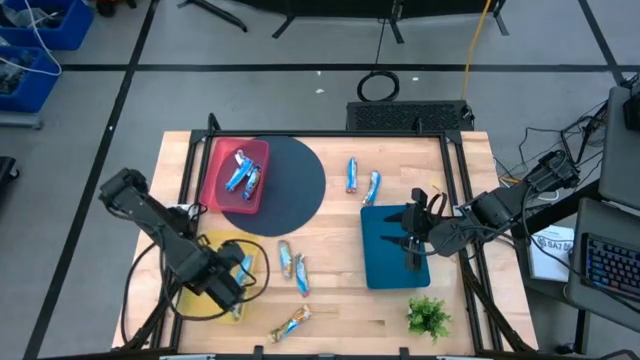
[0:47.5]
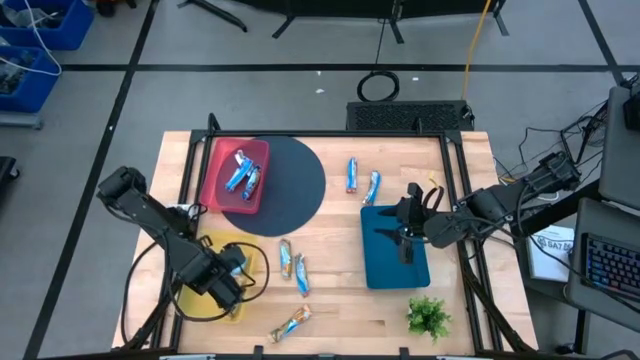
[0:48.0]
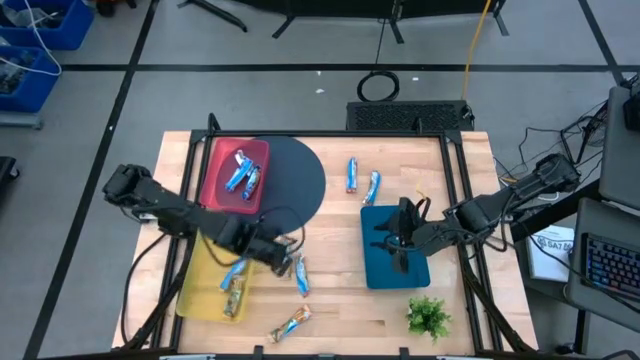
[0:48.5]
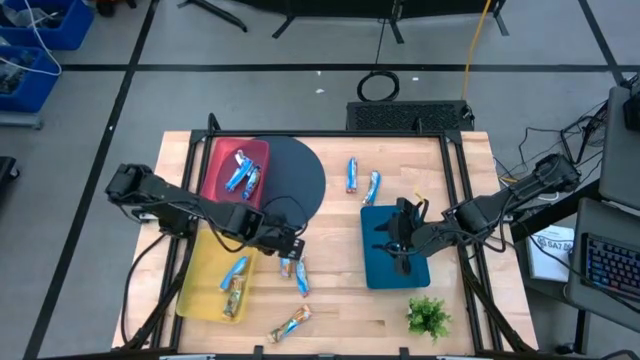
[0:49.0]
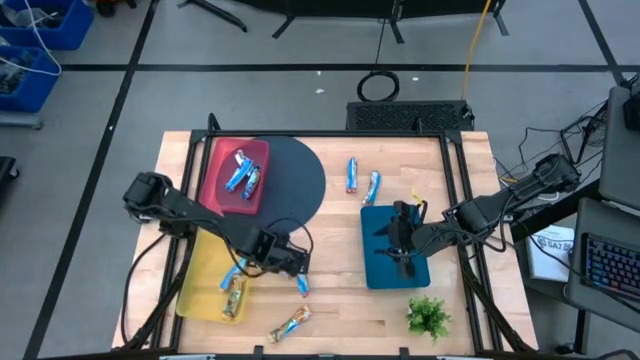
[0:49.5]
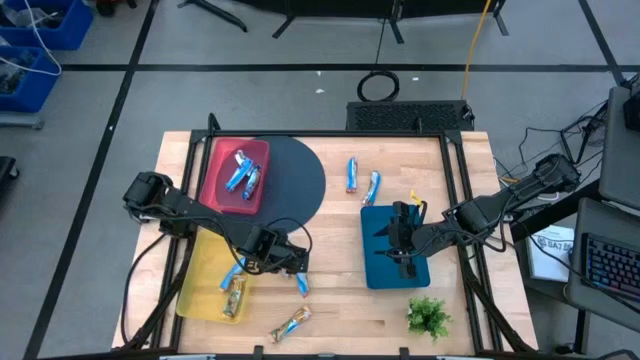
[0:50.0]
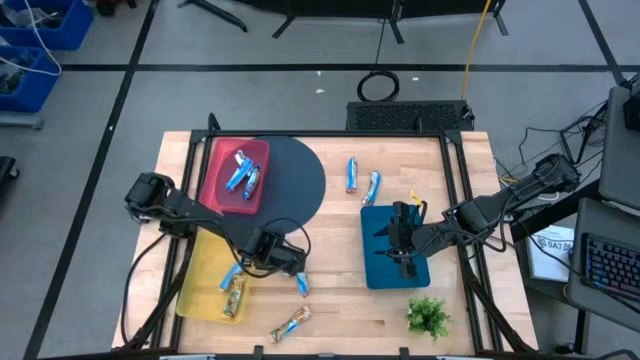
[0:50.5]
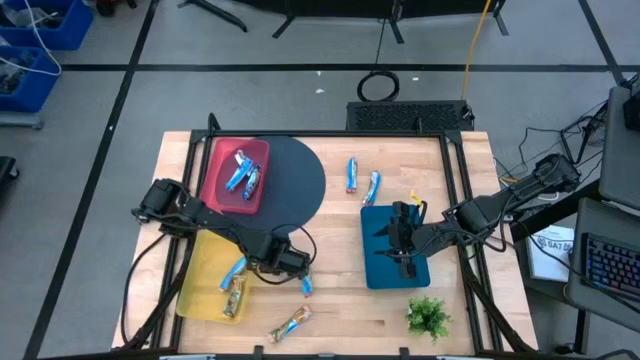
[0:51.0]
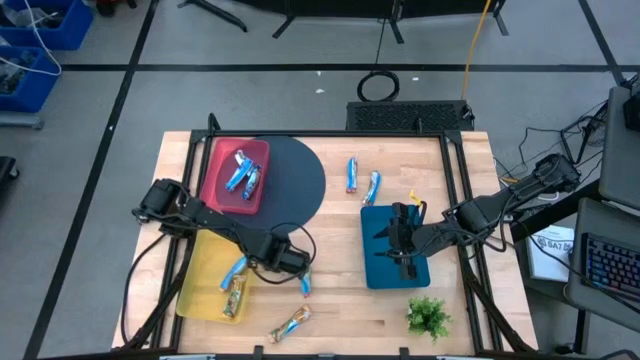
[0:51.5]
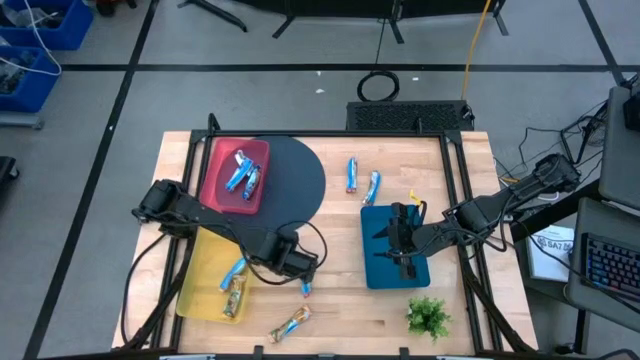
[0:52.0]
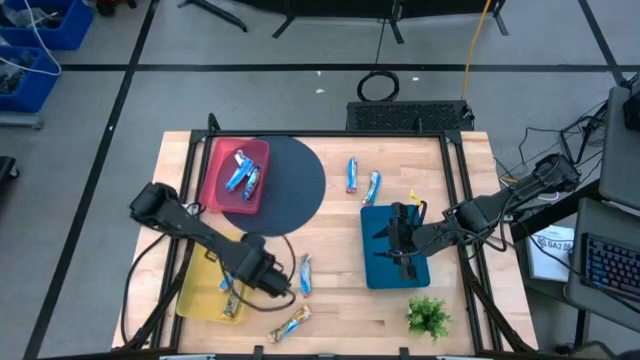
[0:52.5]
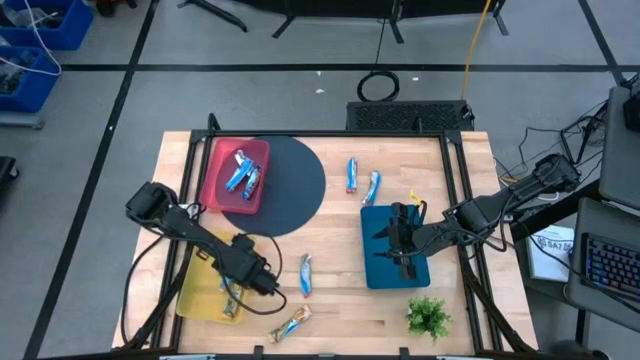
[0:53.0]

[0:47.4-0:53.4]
Task: Pick and place Granola Bars by type
Put the top yellow granola bar into the yellow bin

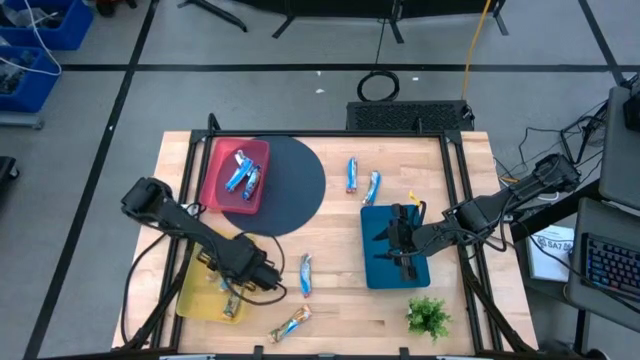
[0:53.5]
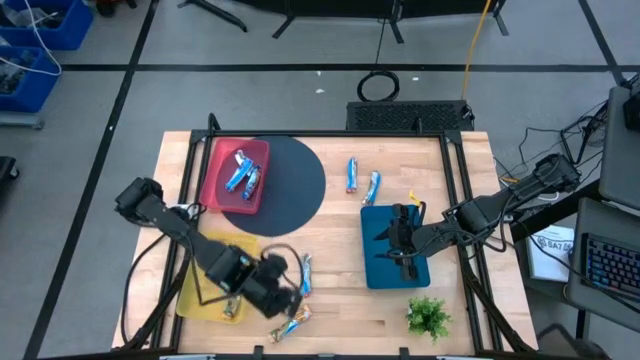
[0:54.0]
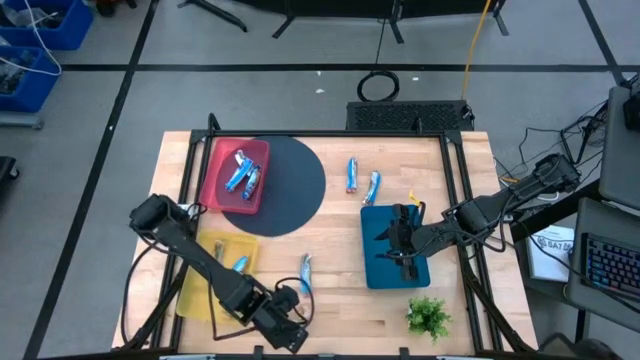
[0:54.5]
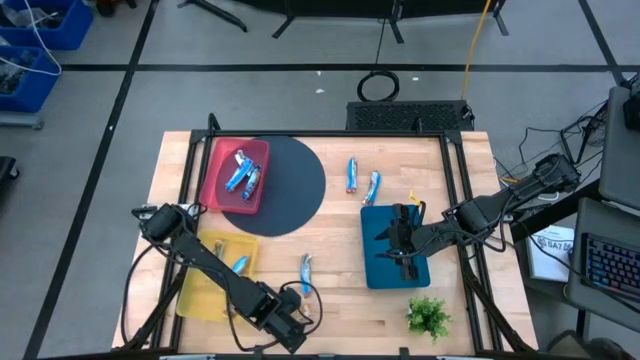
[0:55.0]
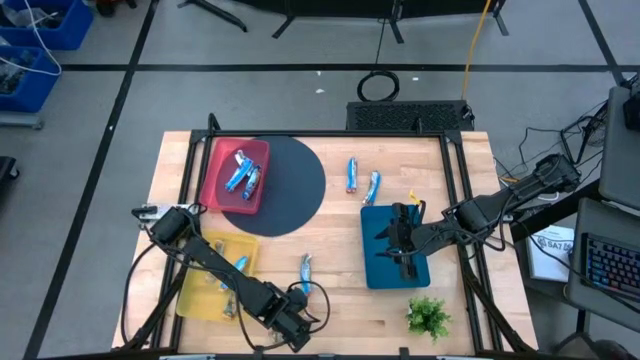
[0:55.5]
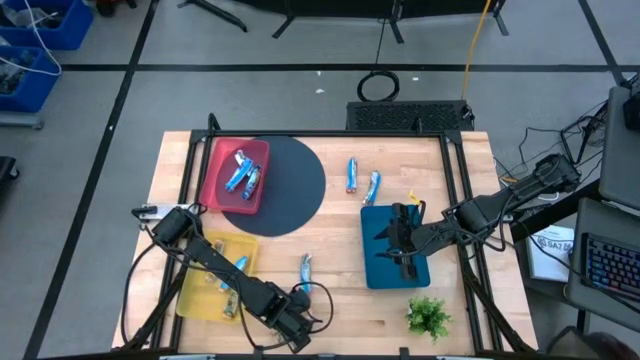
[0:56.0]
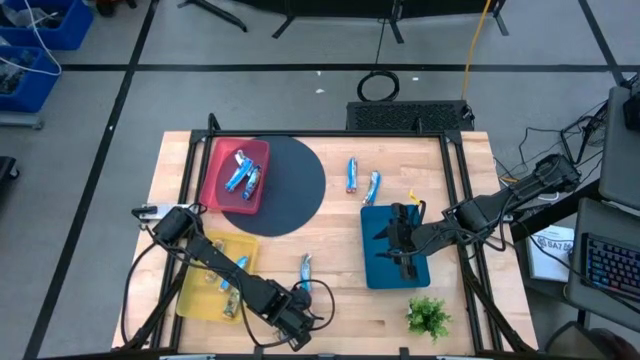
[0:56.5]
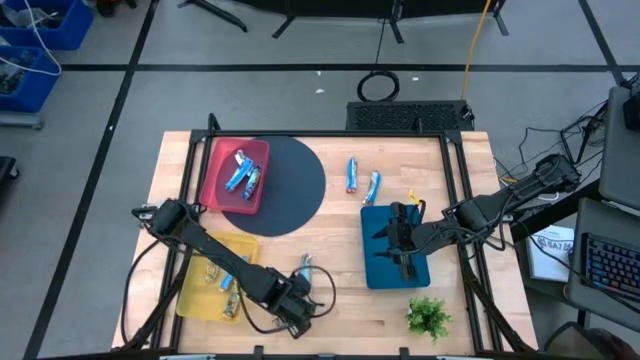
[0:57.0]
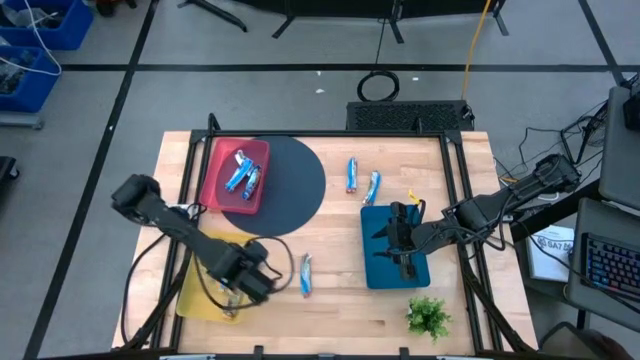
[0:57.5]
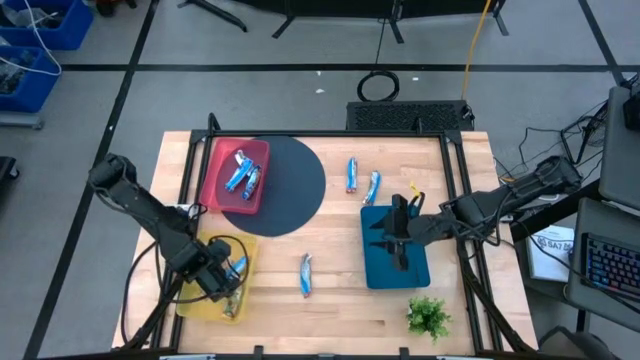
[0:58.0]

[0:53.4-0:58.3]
Put the yellow granola bar into the yellow bin

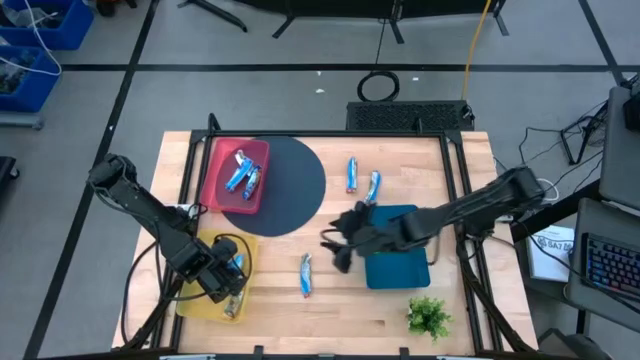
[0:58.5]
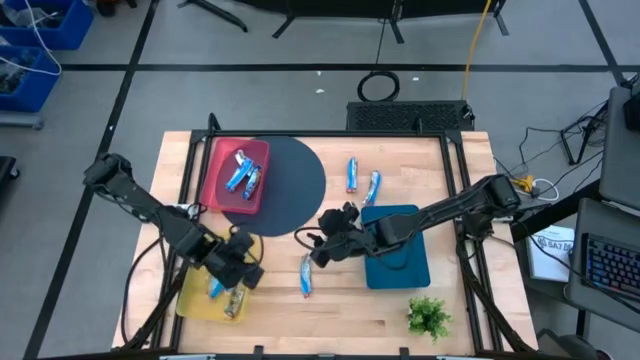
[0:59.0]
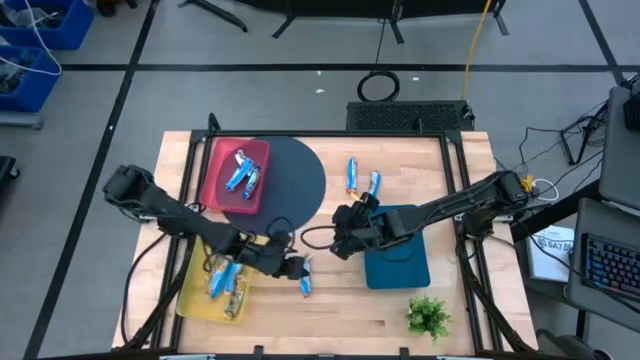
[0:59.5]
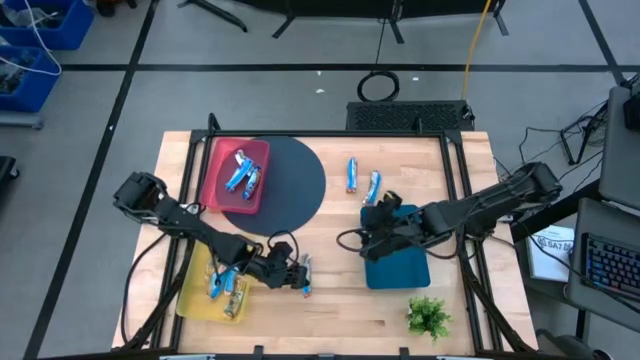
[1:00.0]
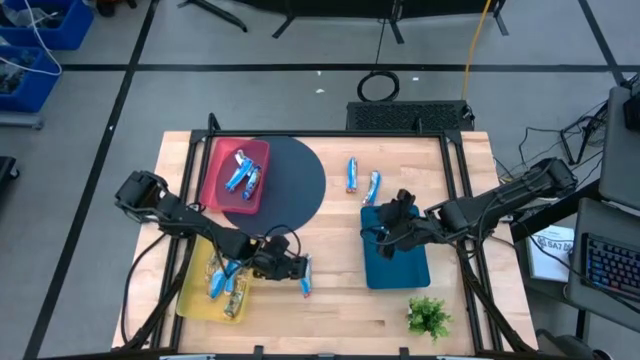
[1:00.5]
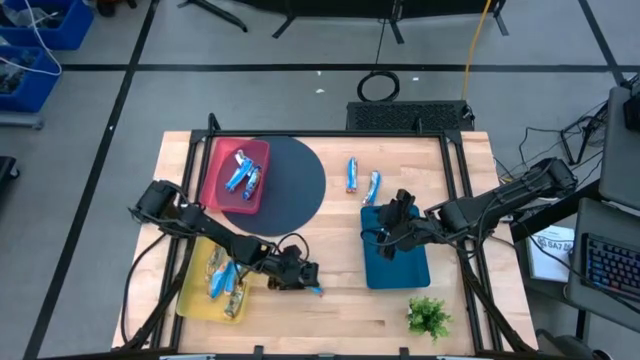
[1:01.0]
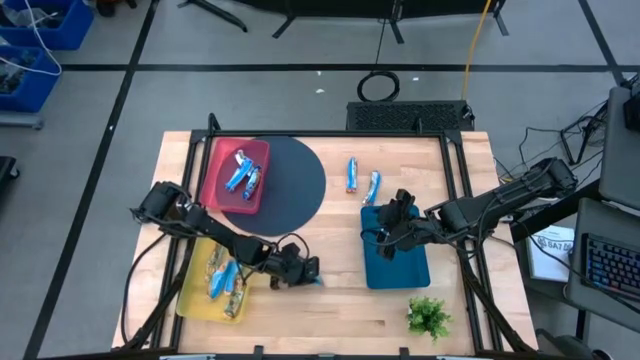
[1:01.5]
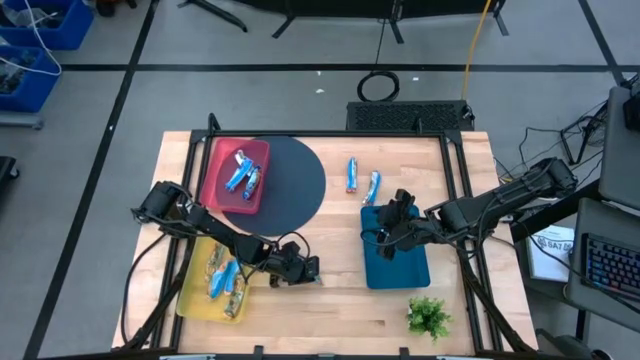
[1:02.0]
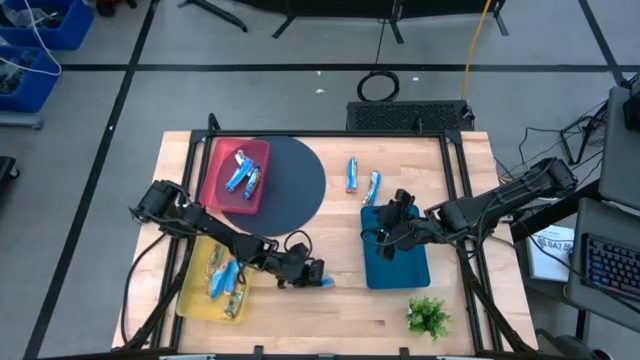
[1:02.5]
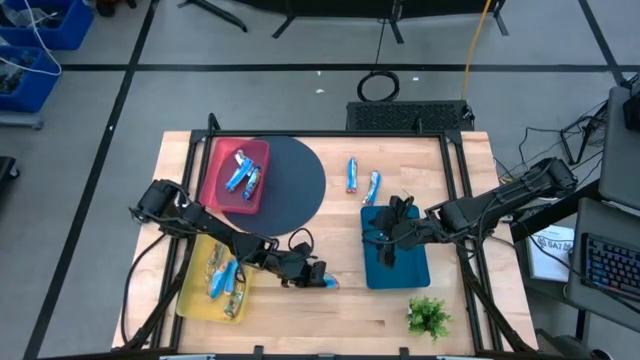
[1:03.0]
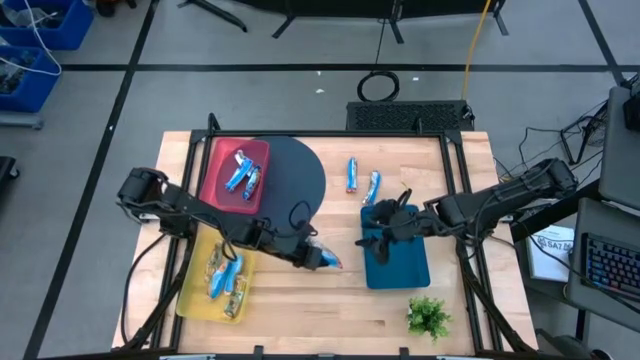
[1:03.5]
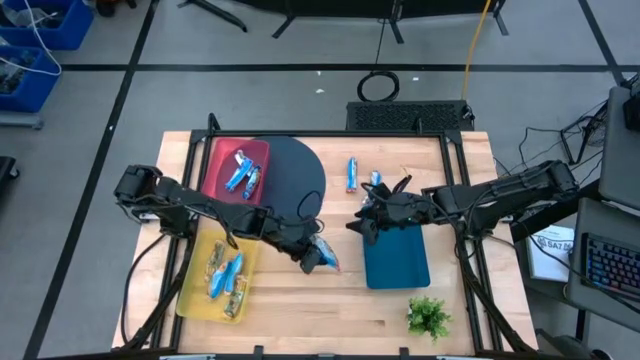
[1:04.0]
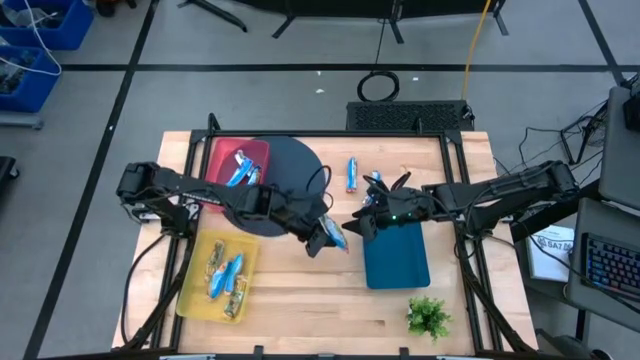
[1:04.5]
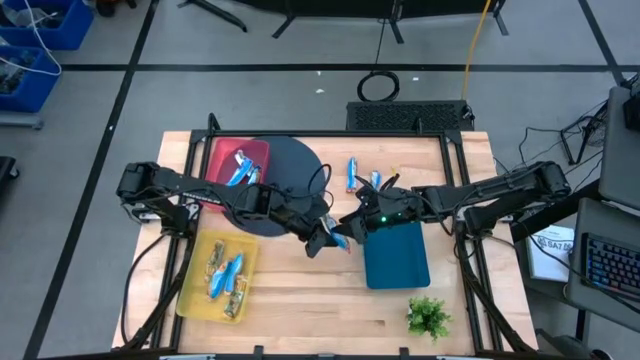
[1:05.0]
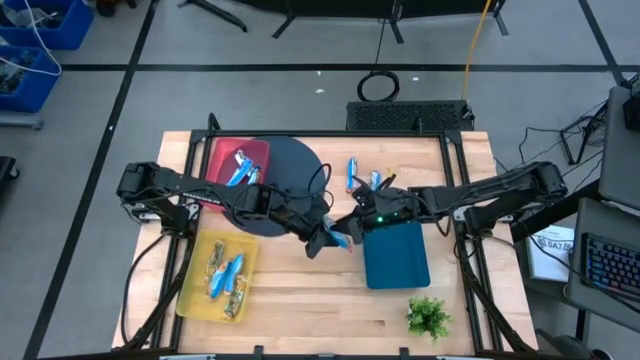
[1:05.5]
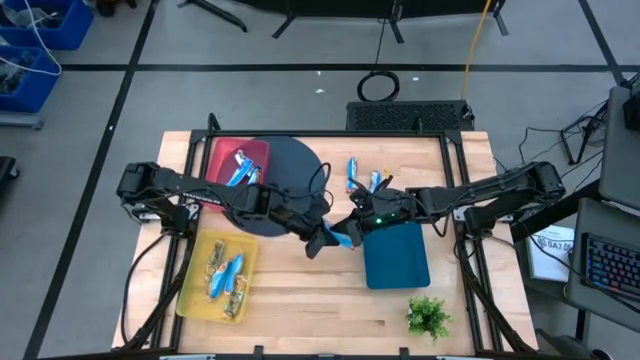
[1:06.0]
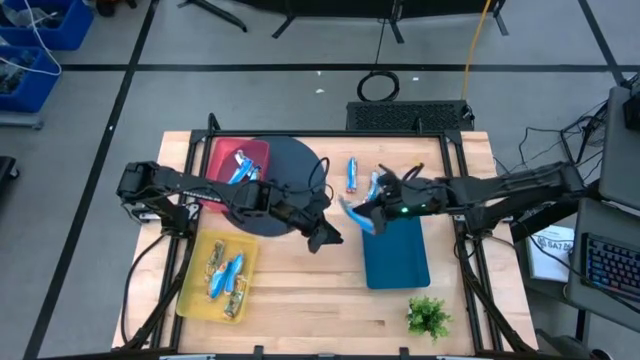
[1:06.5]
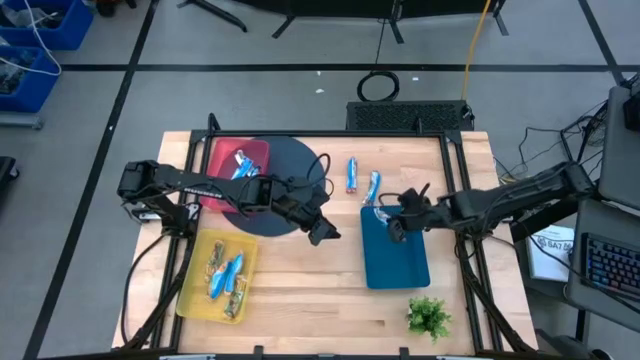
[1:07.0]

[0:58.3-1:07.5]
Put the bottom red granola bar into the blue bin

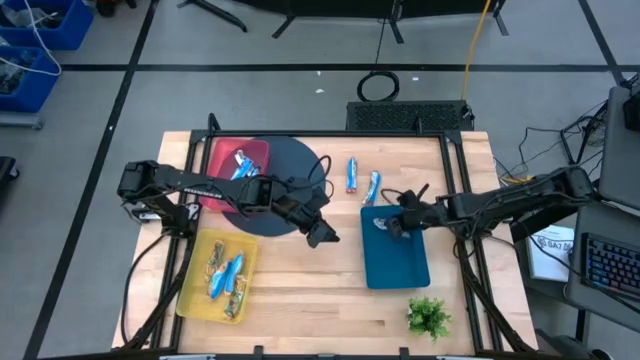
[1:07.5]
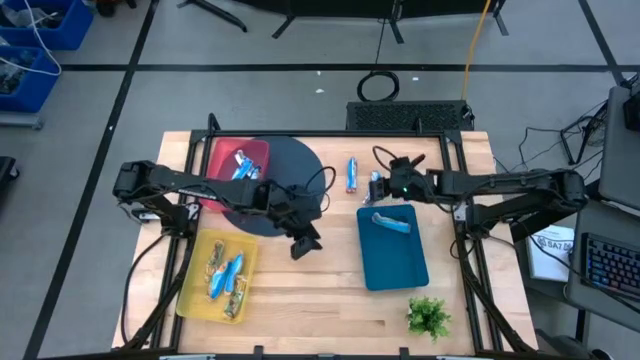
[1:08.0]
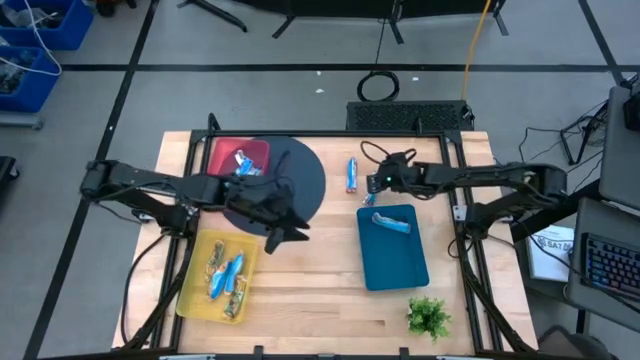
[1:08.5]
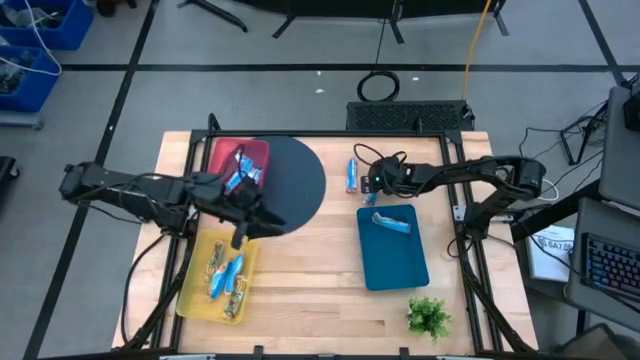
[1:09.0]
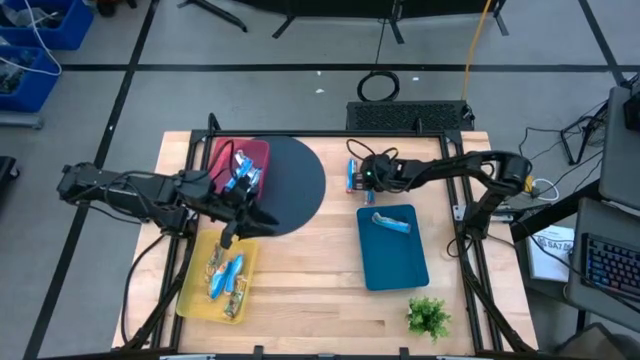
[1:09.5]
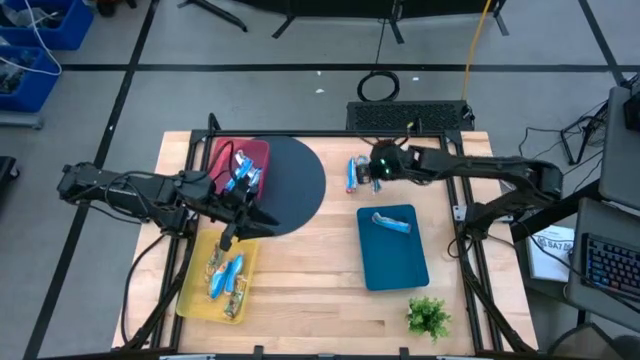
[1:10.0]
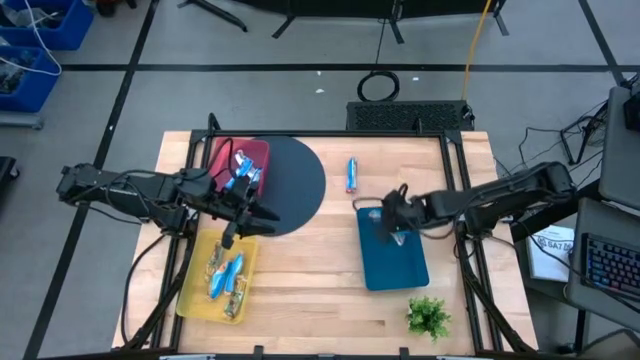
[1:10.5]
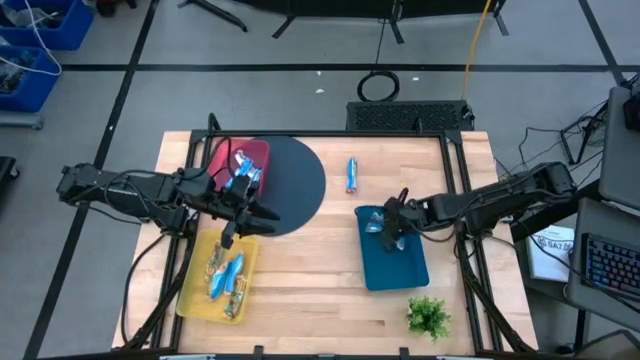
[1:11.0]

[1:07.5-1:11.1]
Put the right red granola bar into the blue bin
